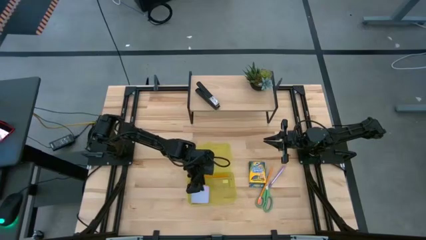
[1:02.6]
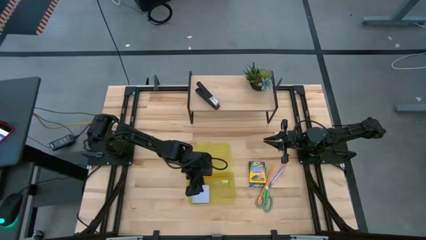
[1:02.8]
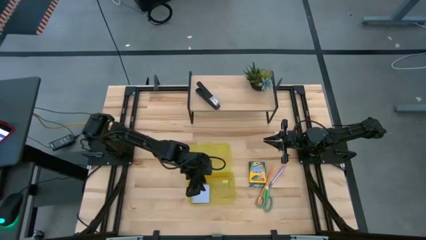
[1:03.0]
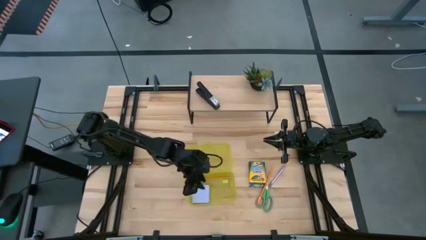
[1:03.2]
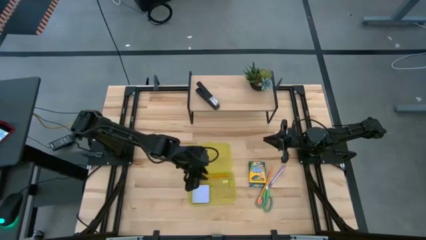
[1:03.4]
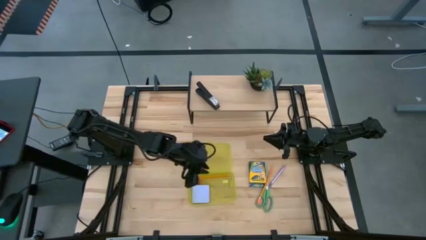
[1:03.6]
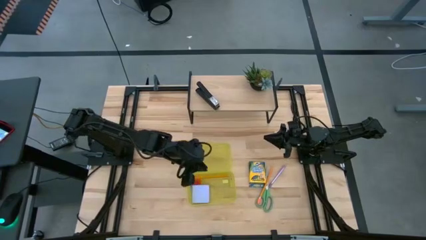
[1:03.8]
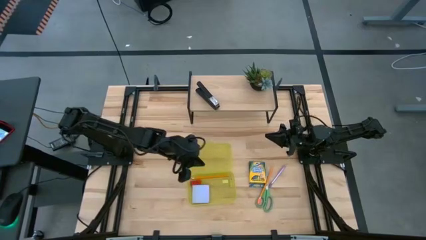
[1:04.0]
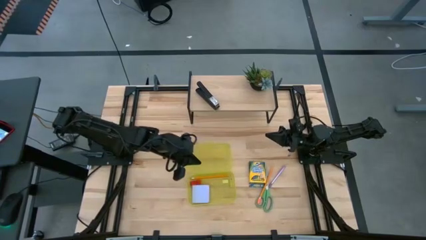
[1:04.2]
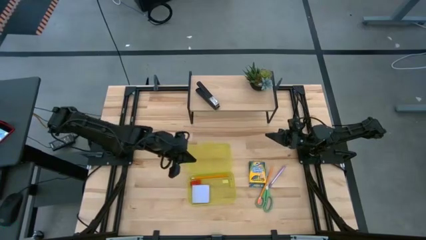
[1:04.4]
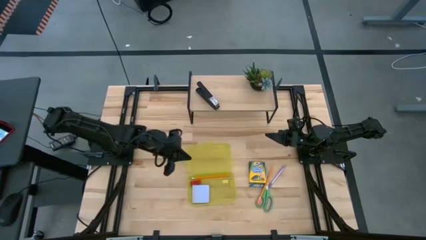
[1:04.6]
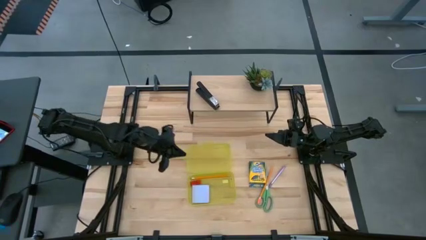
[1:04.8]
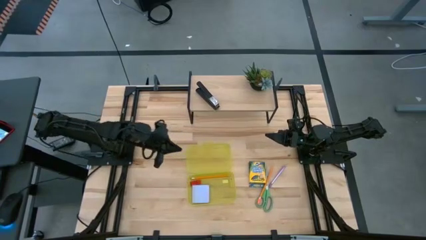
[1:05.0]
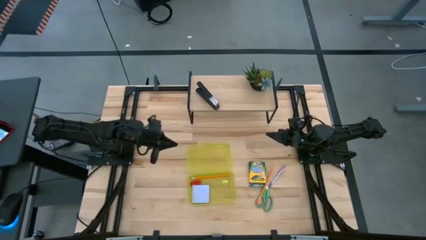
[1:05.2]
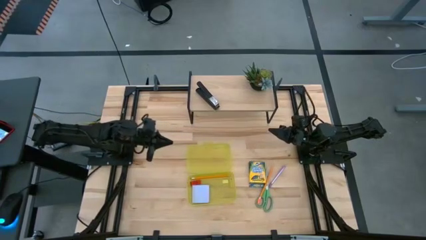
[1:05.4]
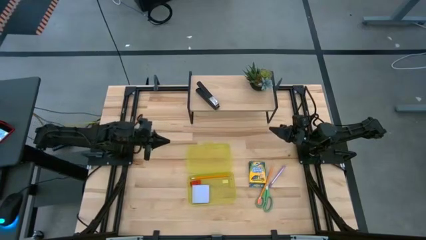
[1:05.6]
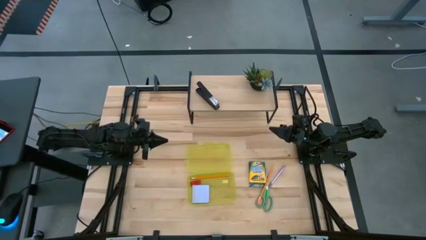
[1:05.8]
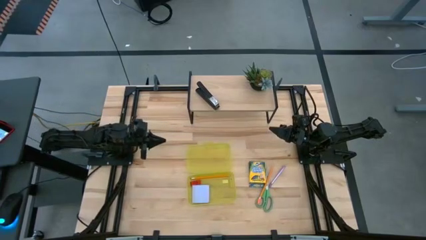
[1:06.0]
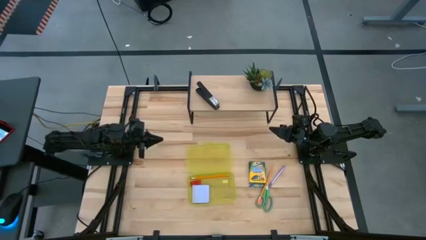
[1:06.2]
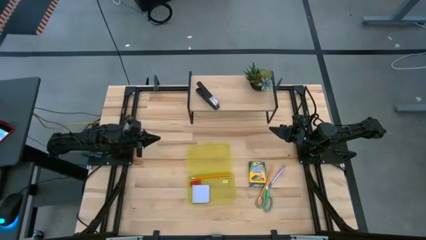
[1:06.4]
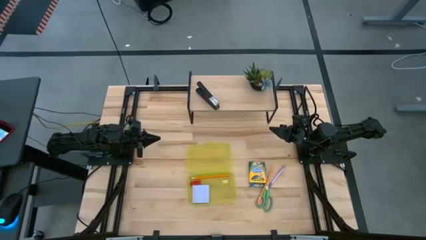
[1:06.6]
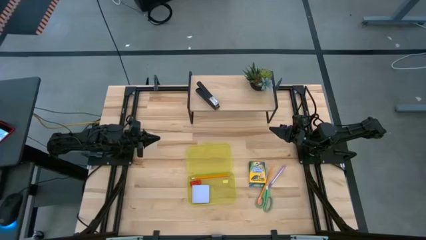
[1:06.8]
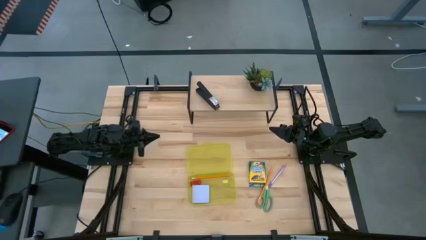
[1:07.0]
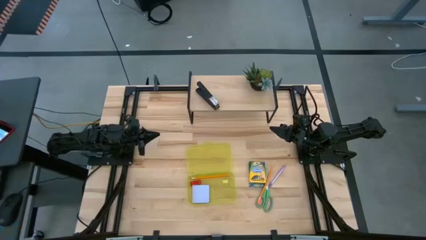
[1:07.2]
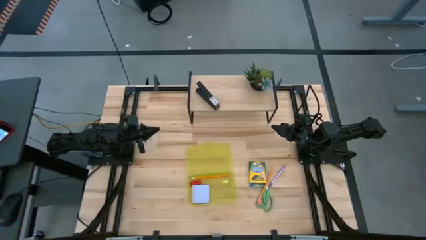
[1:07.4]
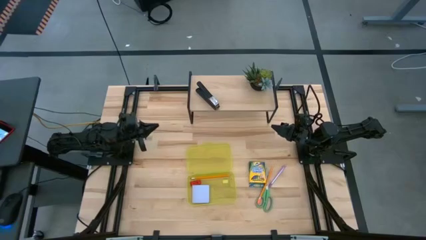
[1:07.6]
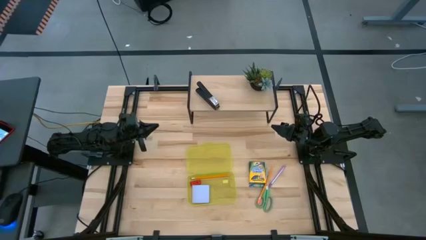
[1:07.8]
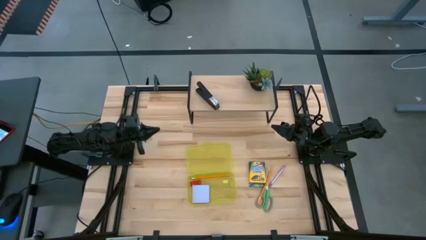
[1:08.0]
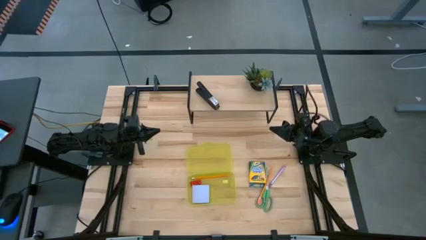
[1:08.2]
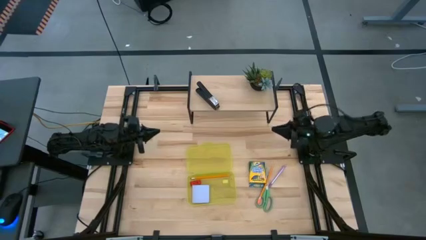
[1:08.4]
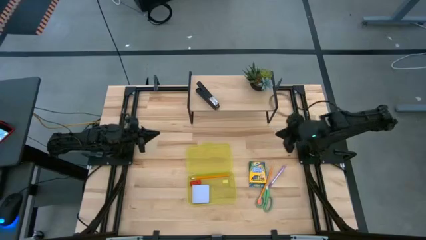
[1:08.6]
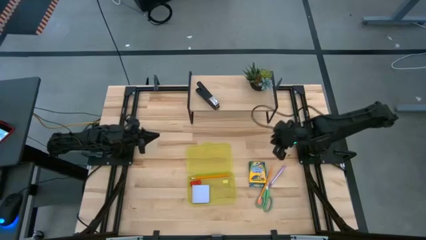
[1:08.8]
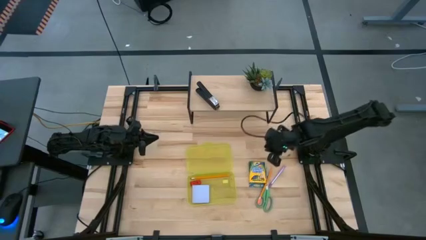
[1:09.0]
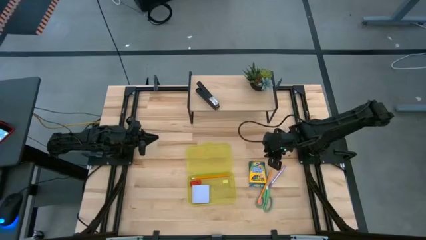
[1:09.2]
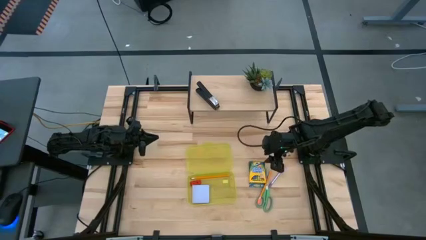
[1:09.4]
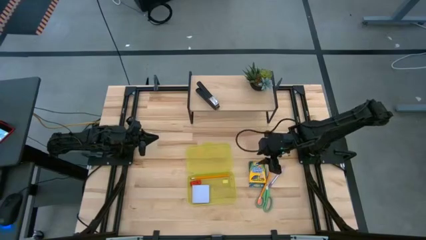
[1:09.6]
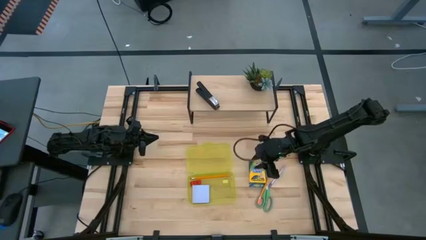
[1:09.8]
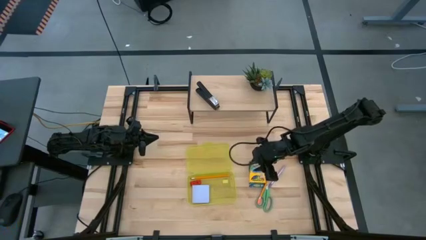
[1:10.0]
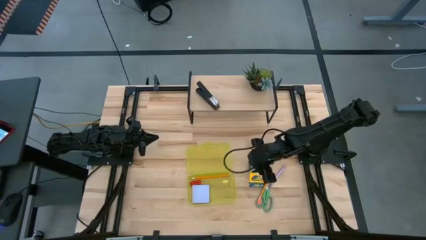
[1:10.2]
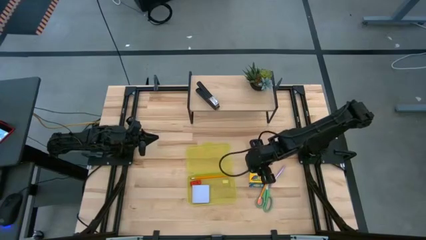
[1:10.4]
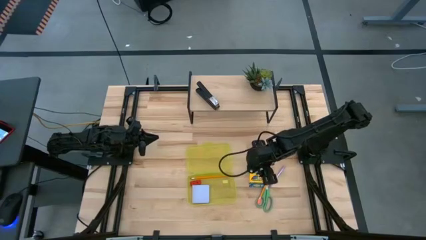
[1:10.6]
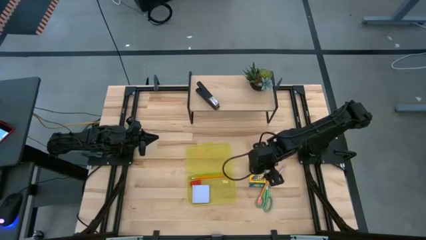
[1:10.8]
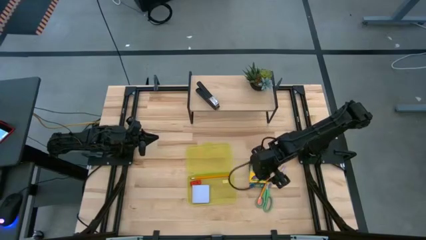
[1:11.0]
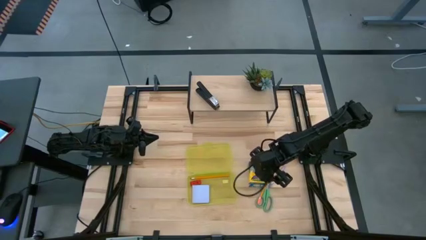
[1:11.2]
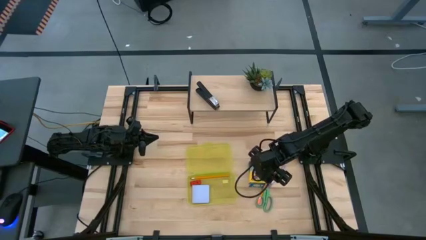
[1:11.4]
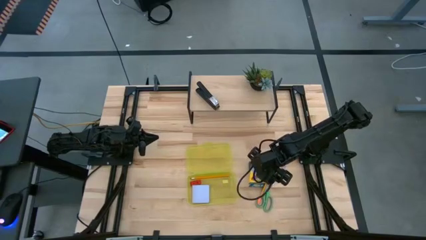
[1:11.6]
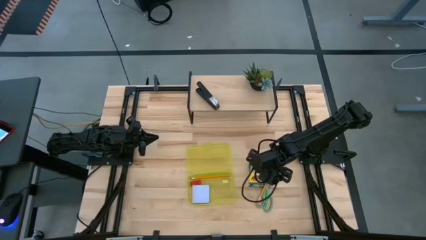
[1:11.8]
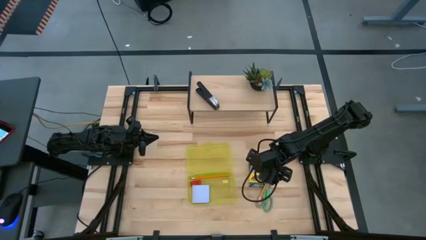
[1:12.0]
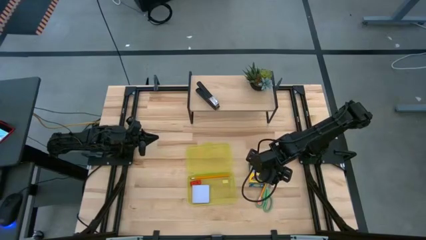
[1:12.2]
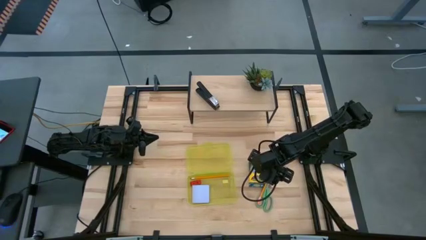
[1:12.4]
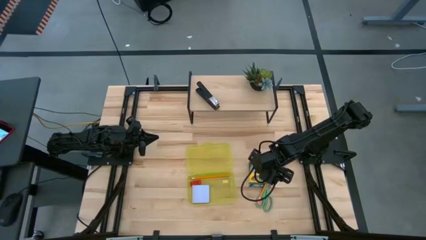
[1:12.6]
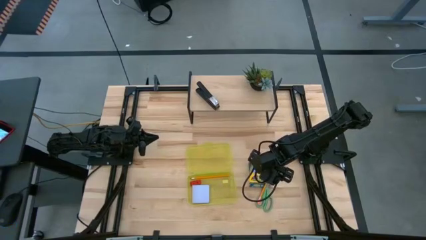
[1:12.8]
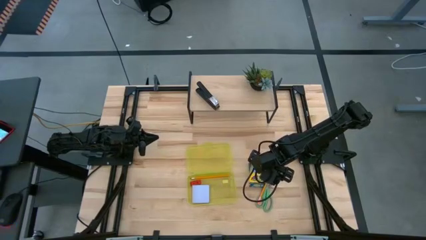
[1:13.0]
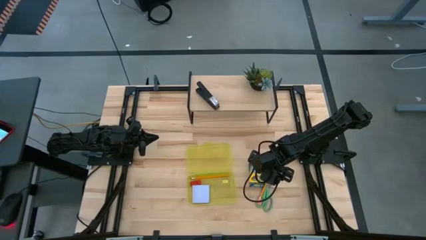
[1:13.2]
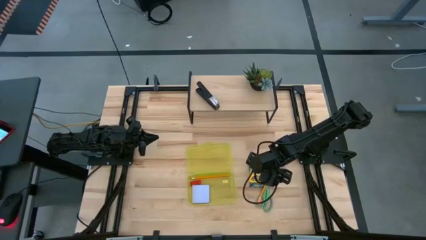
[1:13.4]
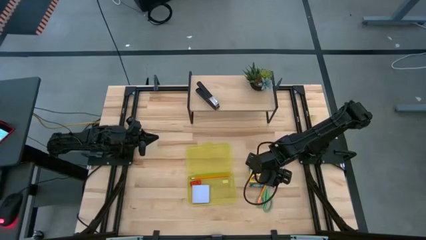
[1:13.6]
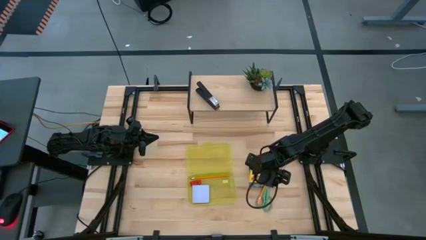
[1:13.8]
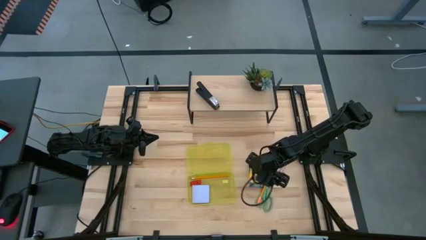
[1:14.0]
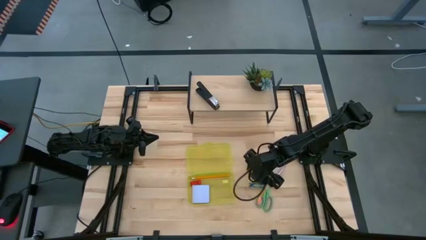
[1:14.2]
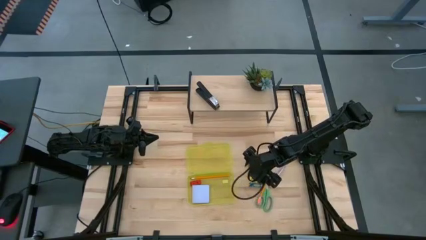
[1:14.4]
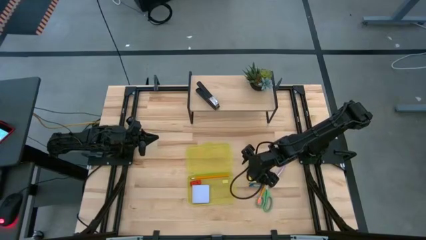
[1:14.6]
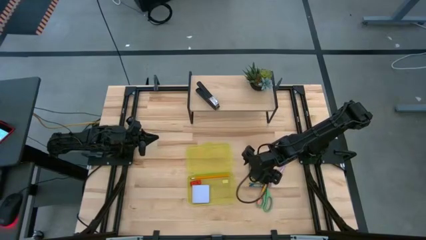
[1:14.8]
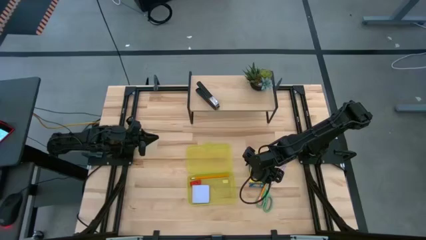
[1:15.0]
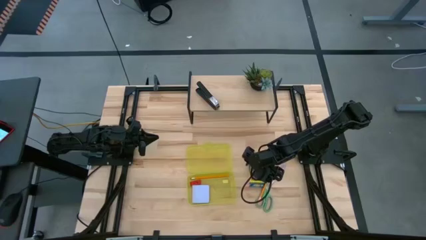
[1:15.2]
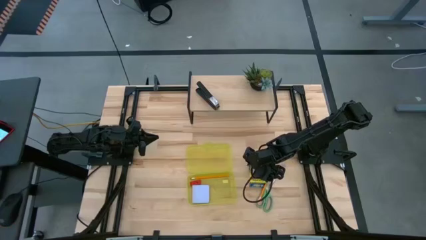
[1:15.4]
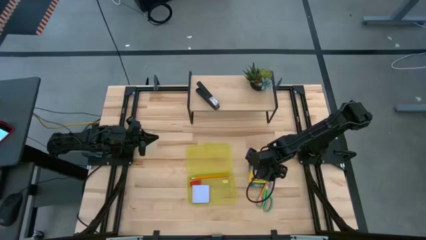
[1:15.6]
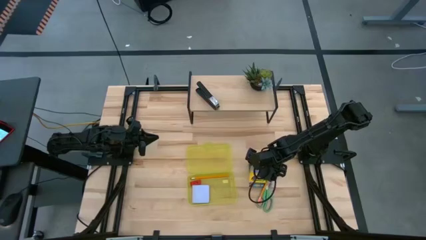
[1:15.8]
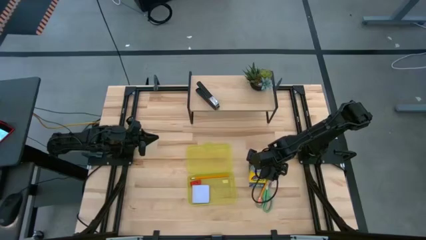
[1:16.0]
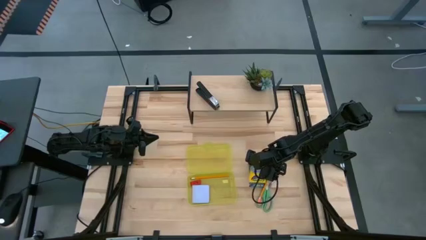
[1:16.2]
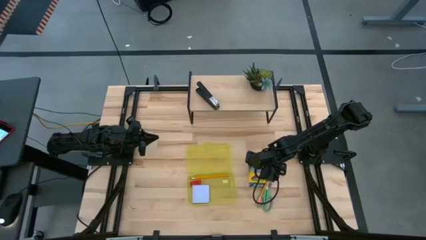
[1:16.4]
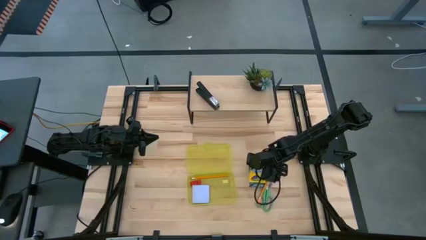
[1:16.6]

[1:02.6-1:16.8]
Task: Pack school essentials
Put the yellow crayon box into the yellow supply box
